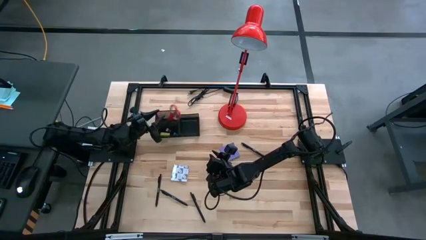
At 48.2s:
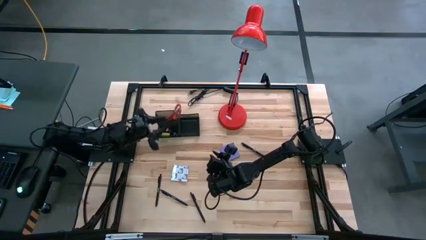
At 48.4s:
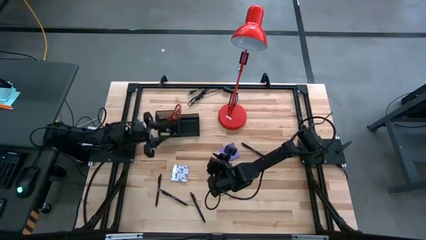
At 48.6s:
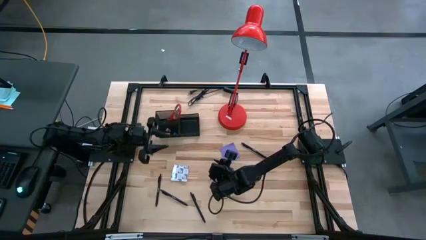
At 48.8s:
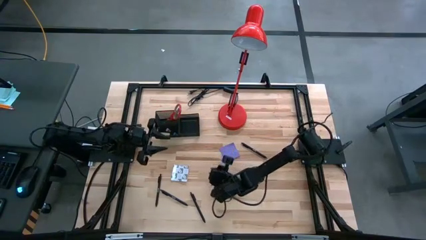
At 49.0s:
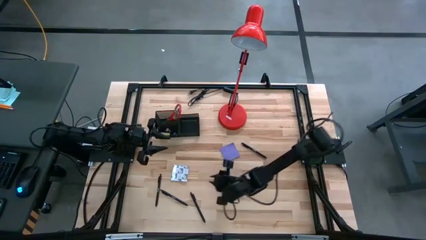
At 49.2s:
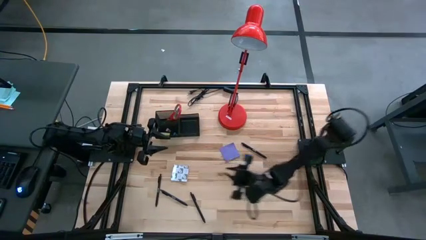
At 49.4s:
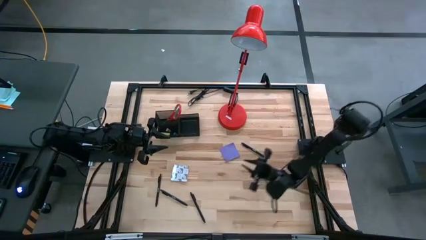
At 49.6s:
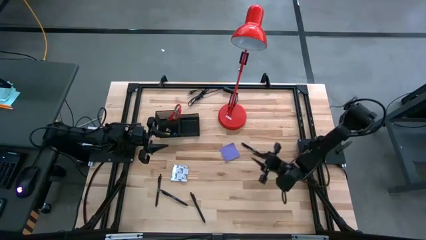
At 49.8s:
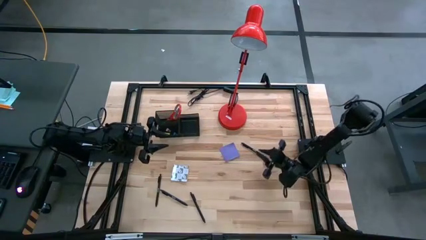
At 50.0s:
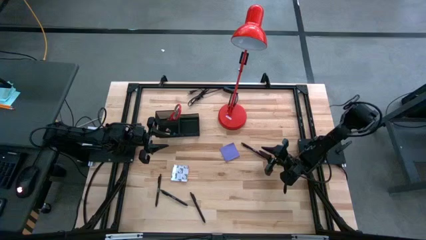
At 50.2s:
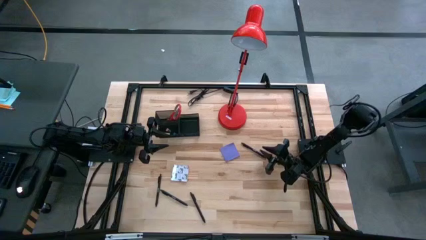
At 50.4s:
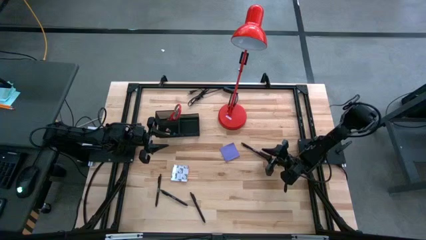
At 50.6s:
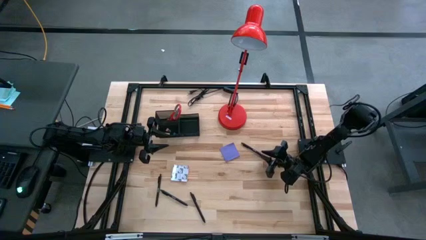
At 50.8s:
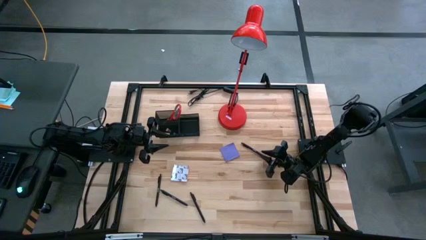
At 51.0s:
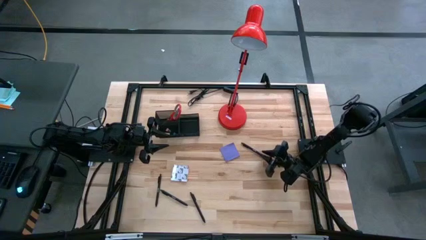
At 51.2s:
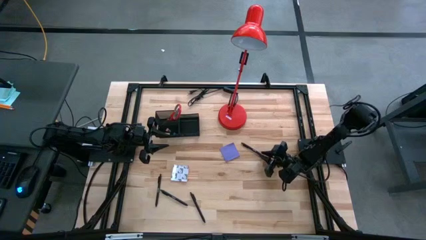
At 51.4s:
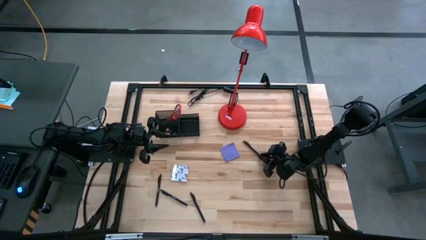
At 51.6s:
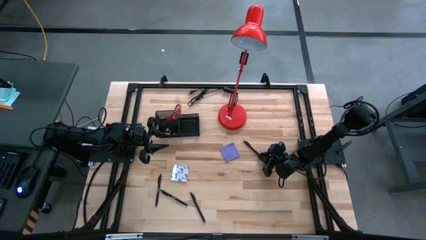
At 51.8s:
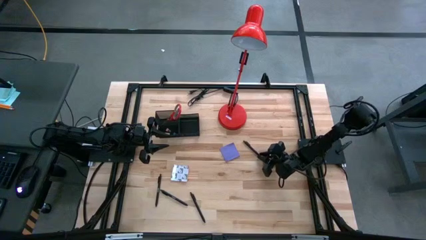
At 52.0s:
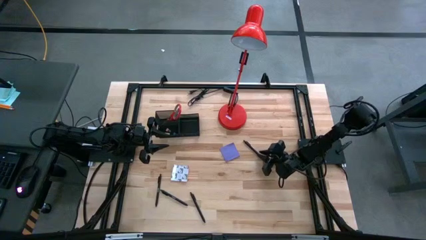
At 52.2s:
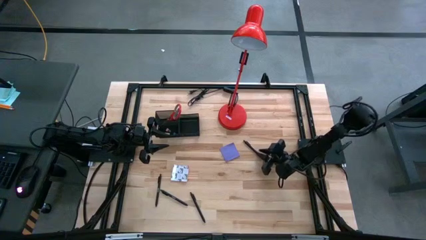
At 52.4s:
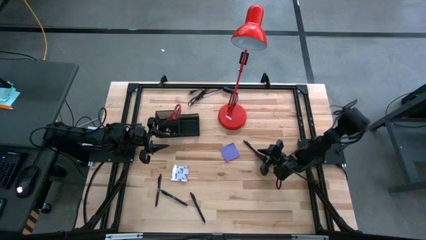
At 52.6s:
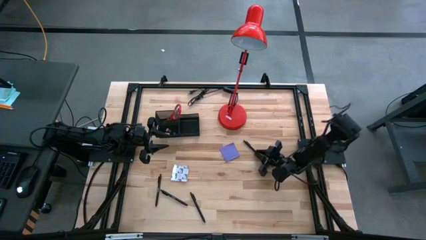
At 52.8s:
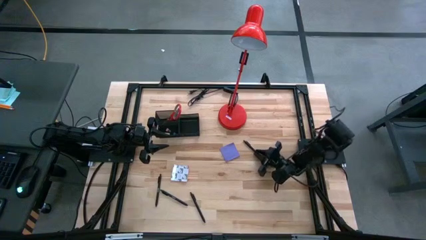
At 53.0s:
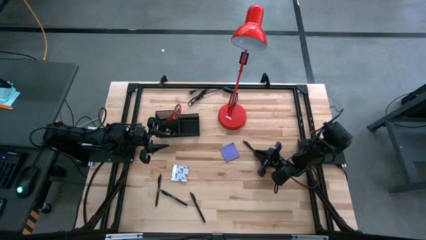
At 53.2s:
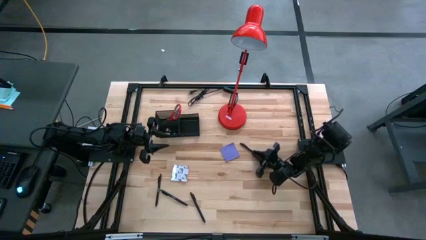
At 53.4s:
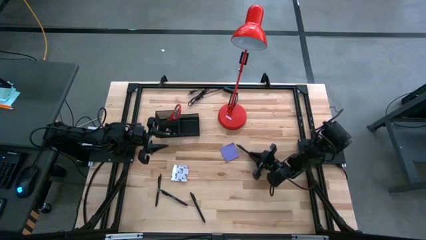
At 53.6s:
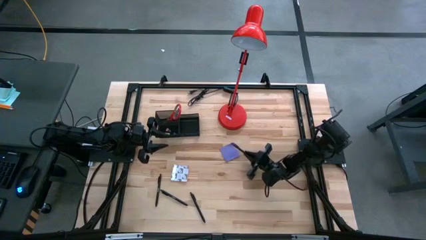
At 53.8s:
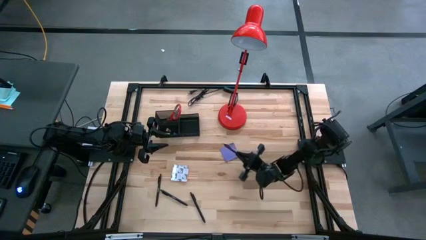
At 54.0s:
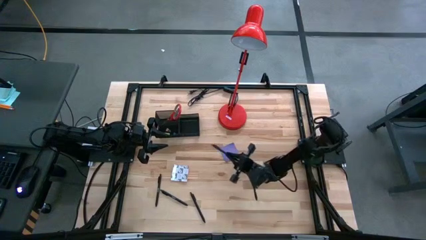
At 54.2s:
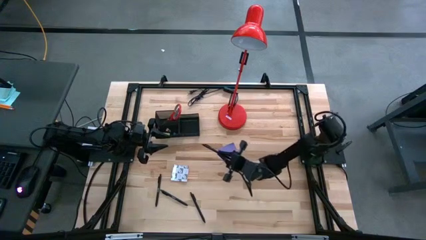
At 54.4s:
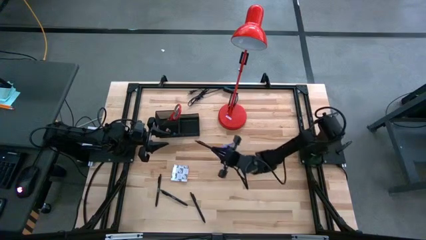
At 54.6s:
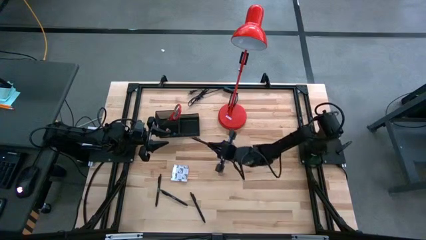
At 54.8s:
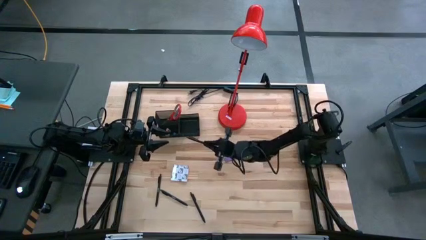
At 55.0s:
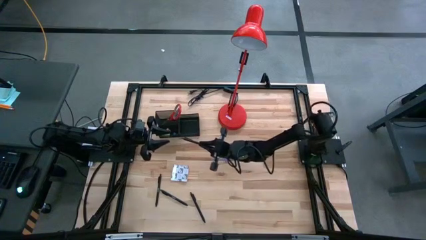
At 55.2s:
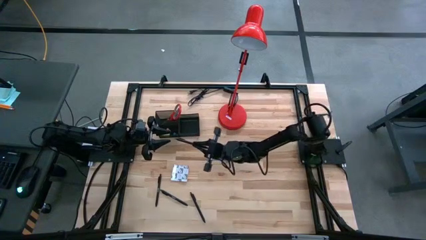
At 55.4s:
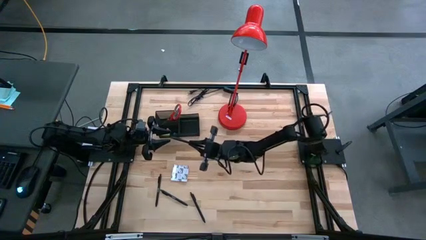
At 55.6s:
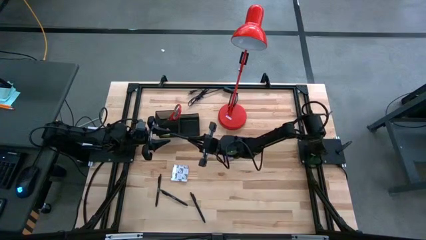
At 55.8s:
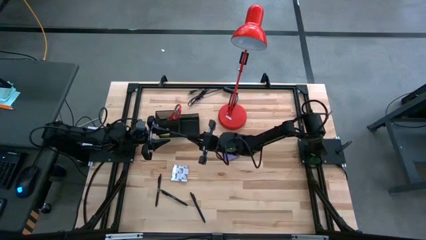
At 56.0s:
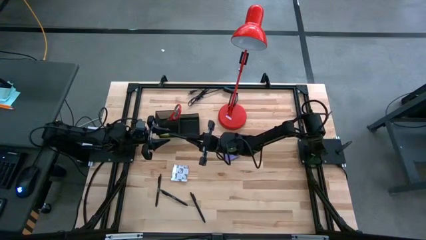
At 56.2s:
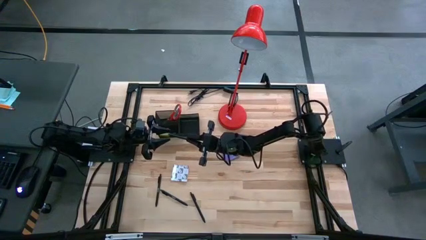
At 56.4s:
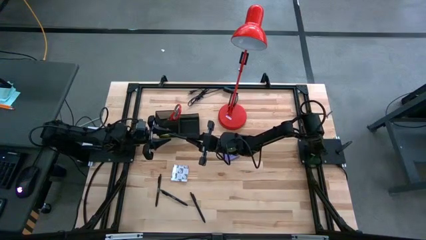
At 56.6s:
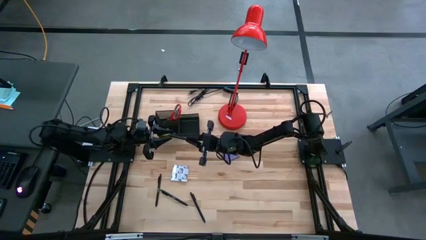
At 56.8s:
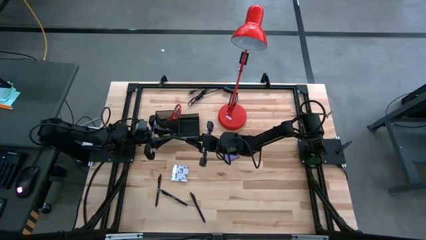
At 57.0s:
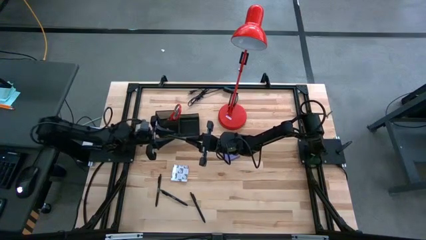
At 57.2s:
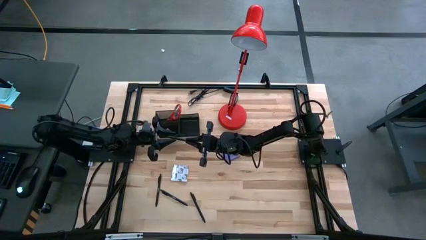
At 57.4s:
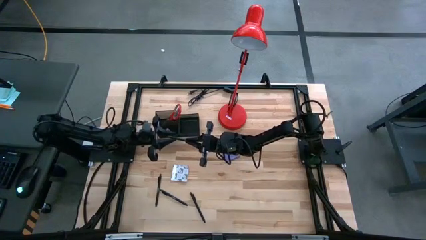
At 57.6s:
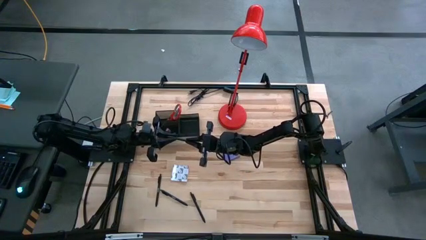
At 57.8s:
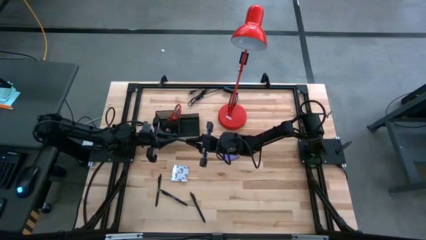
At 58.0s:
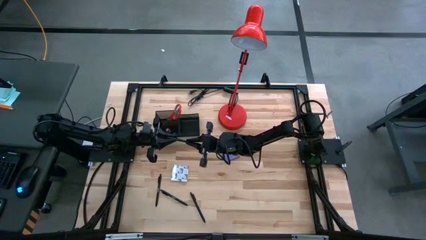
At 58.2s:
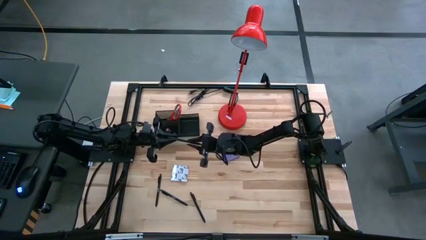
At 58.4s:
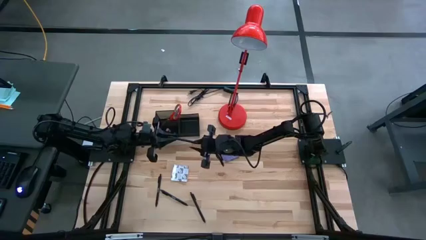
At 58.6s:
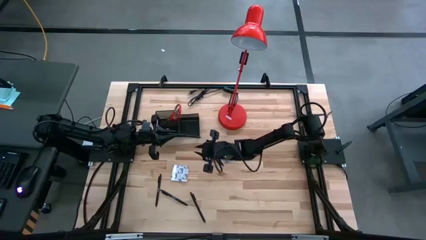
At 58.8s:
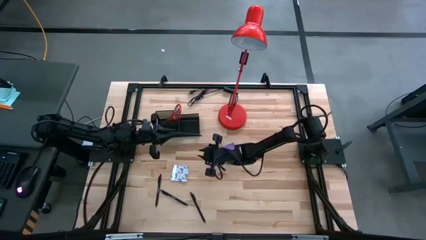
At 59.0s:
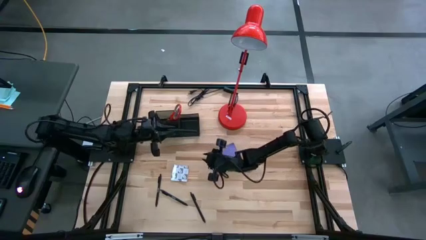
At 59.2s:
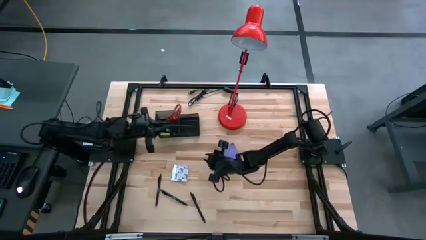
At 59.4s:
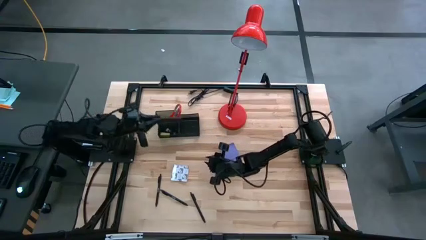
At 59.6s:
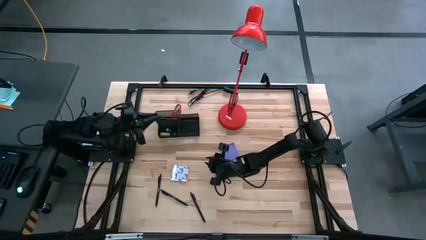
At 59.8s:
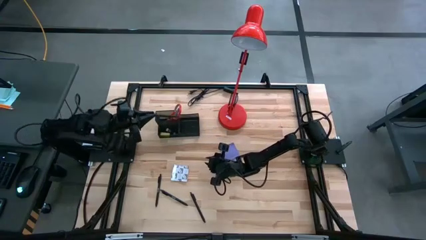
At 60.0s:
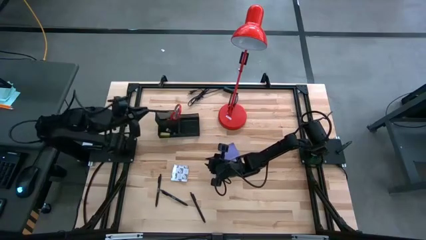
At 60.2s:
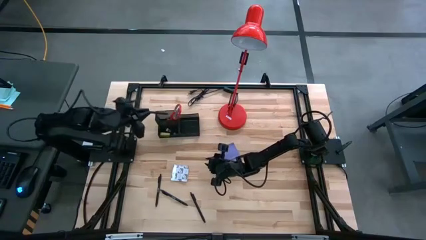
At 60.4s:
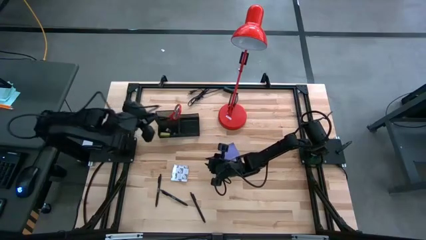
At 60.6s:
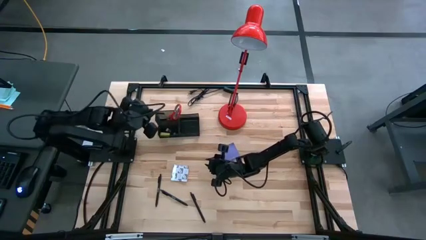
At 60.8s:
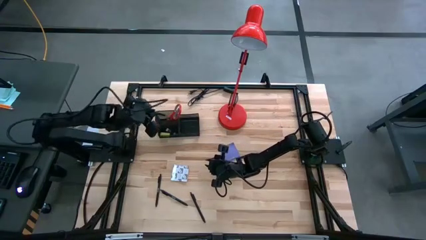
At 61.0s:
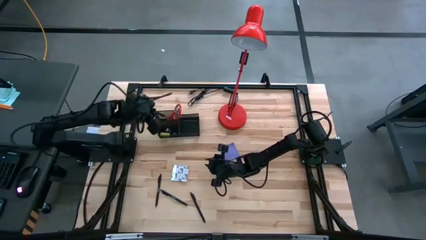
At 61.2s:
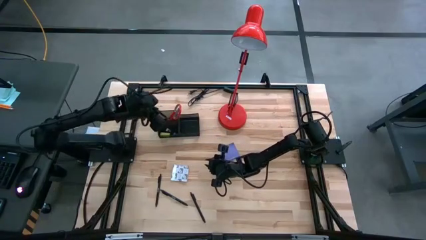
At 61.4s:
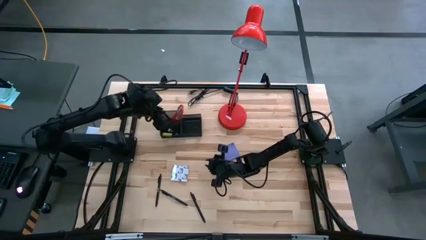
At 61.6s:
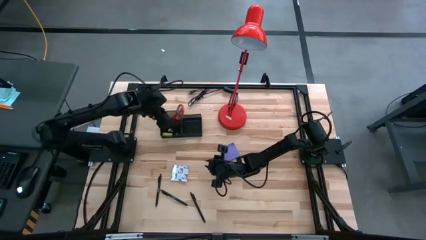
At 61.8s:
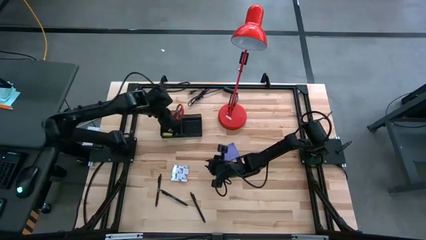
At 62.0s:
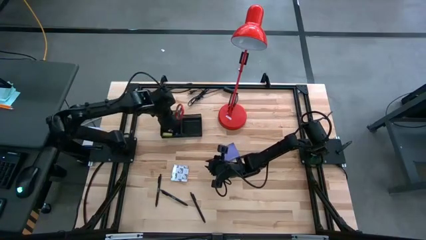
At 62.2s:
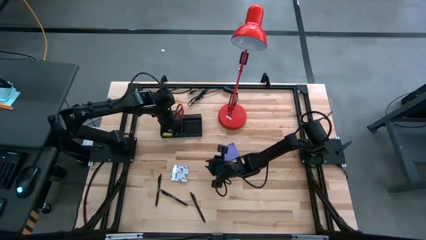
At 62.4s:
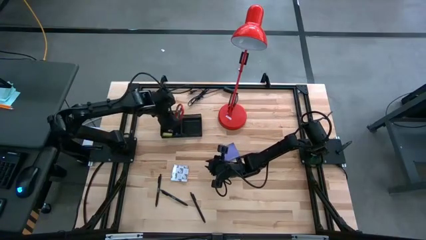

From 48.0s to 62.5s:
Task: Pick and place office supplies into organizer
Put the black pen into the black desk organizer
